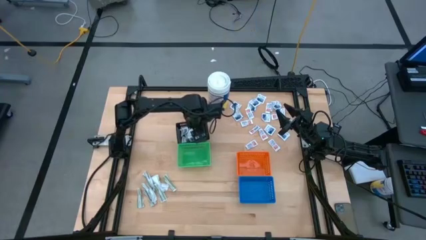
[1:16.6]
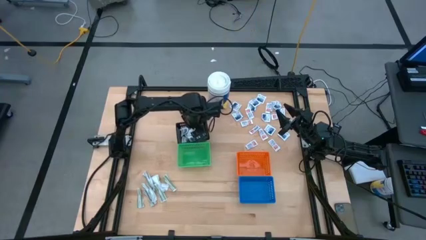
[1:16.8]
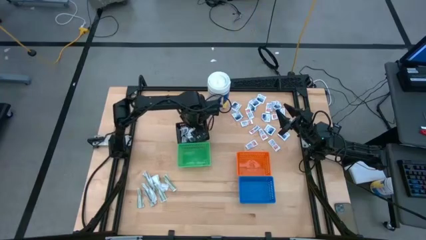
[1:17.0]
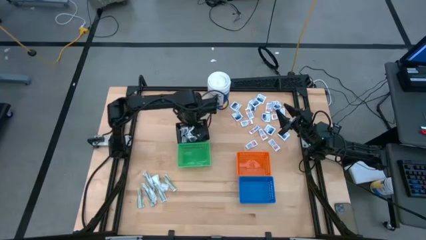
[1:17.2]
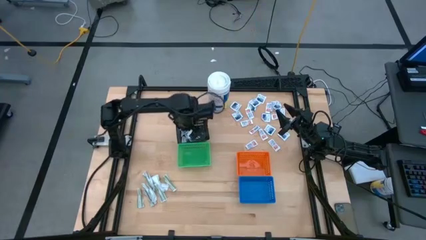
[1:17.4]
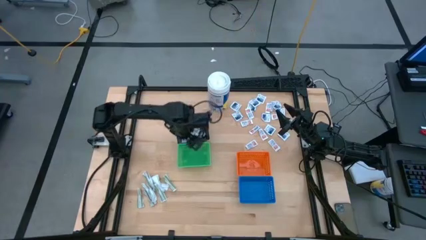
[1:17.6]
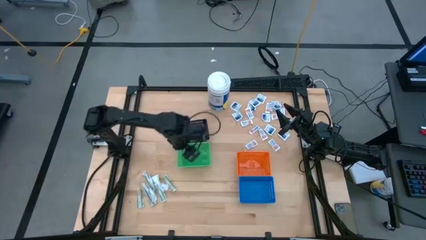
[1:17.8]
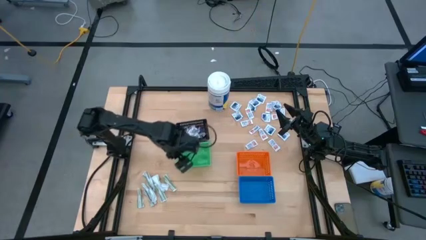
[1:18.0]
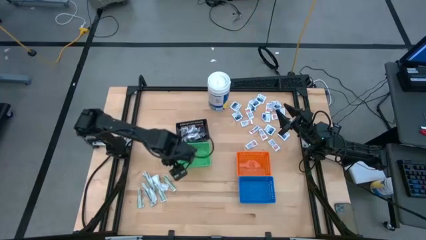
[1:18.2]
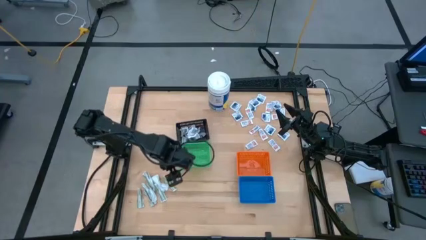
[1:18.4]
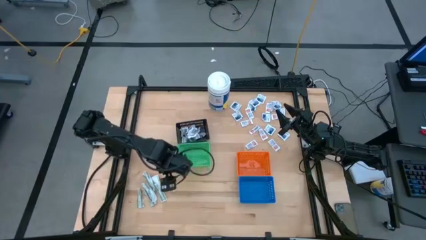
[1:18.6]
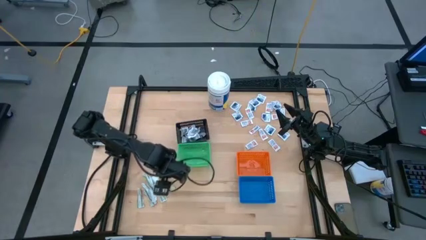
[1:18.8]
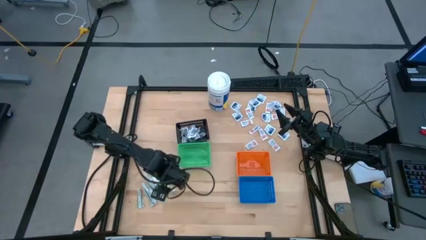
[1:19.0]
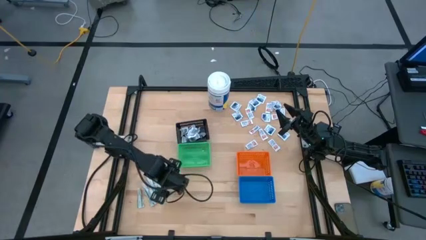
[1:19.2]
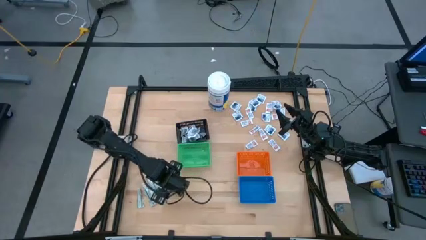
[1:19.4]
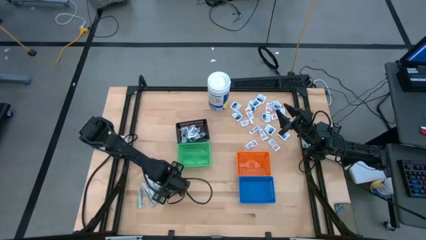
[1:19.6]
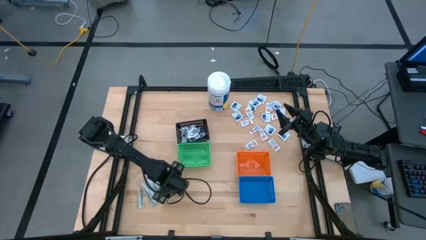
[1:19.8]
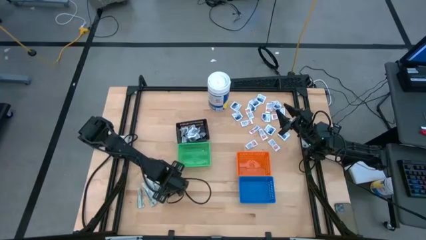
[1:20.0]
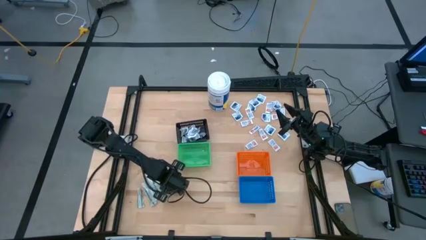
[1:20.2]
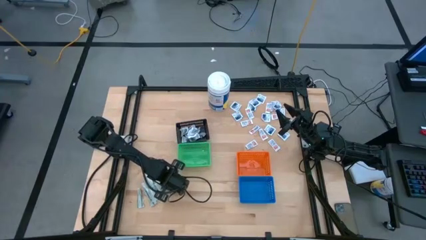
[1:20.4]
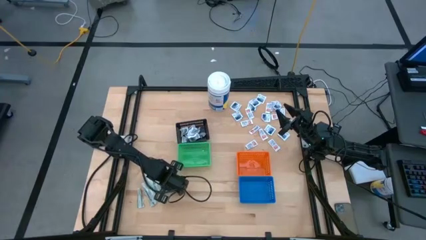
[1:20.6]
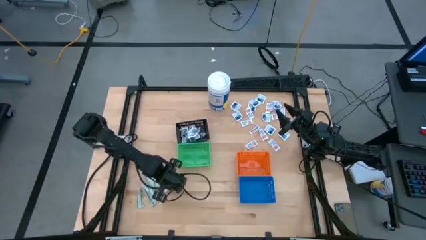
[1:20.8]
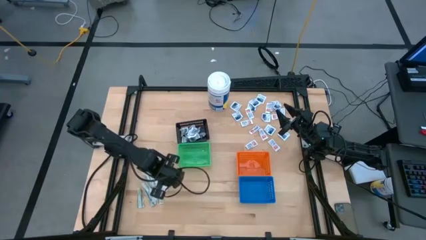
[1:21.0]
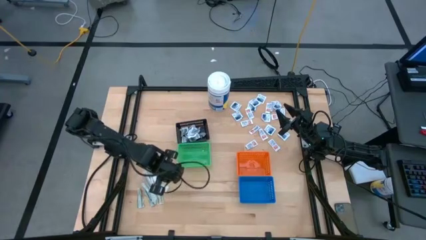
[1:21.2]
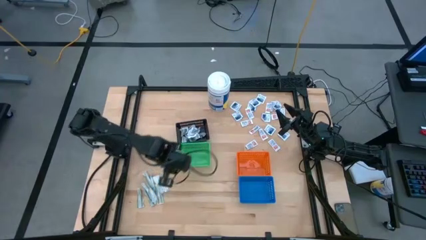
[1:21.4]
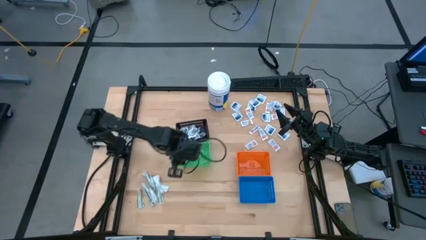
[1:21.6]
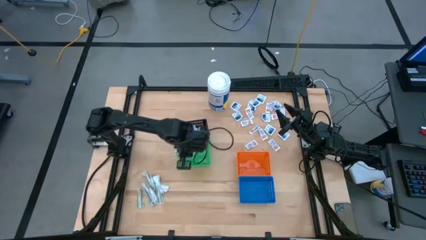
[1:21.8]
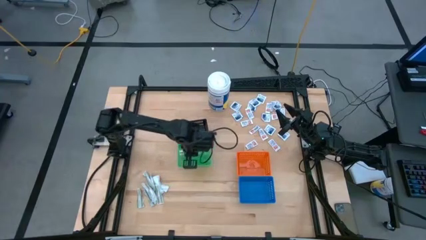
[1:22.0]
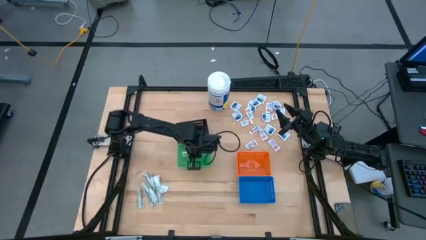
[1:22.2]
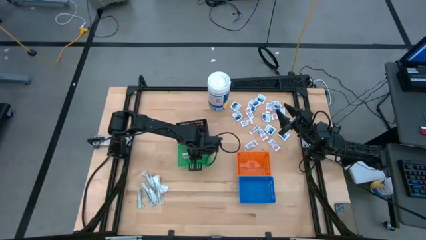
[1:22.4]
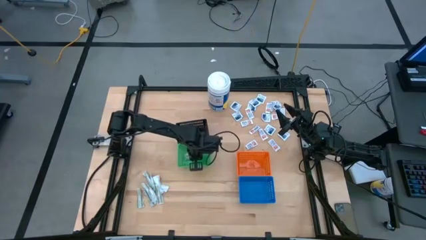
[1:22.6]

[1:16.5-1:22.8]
Task: Pick & Place First Aid Supplies
Put the green bandage into the green bin

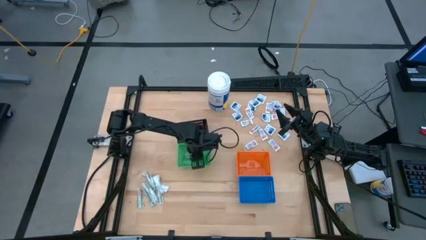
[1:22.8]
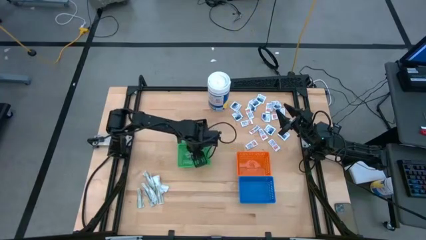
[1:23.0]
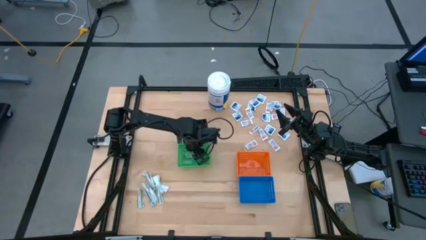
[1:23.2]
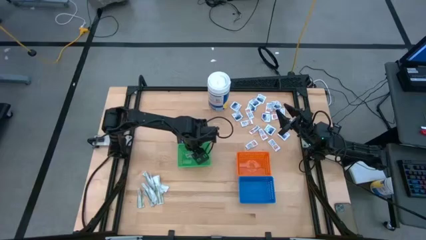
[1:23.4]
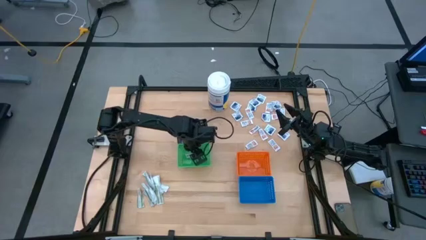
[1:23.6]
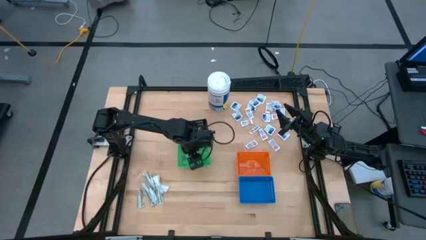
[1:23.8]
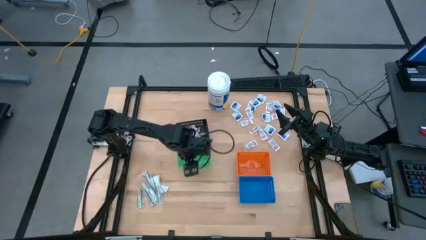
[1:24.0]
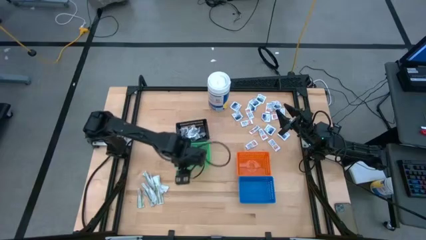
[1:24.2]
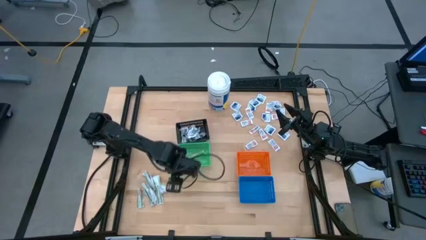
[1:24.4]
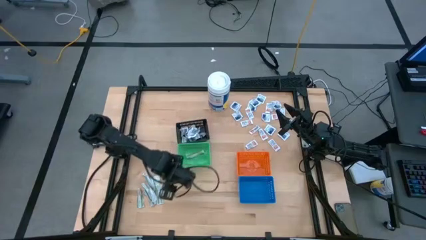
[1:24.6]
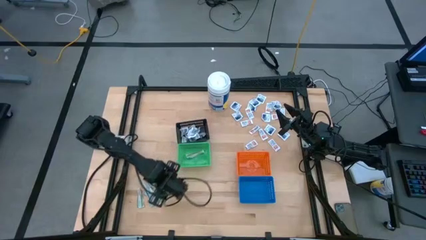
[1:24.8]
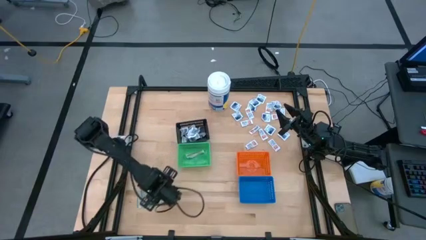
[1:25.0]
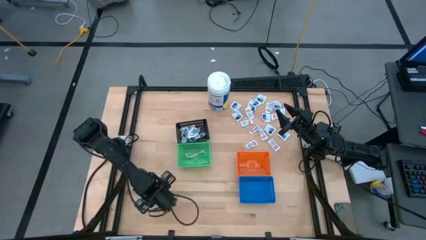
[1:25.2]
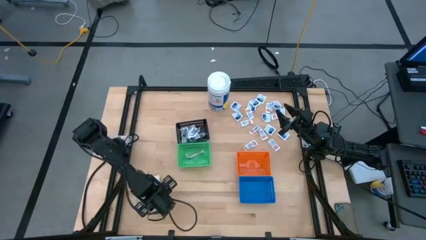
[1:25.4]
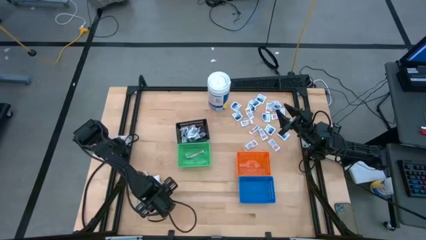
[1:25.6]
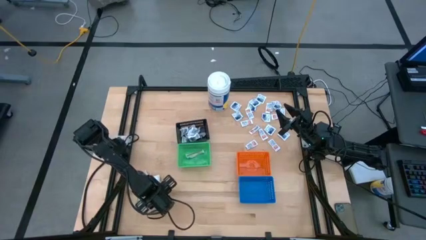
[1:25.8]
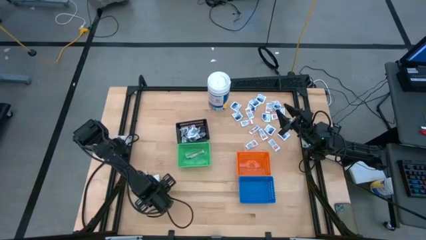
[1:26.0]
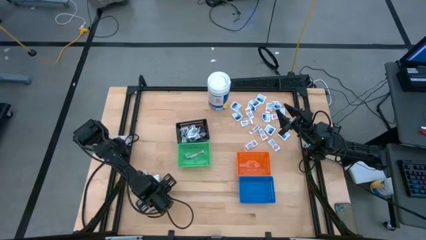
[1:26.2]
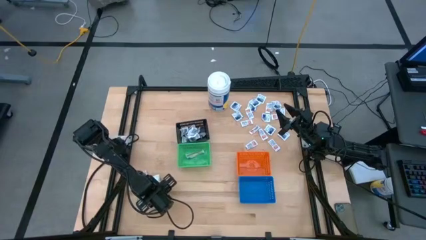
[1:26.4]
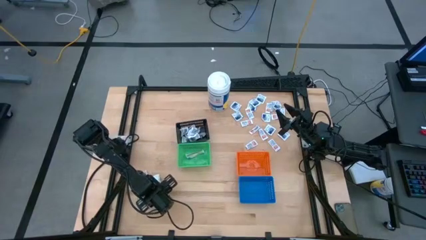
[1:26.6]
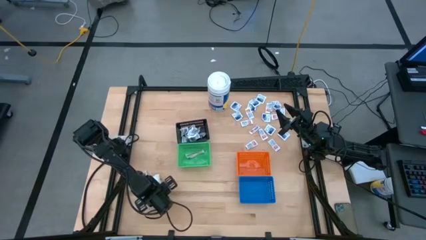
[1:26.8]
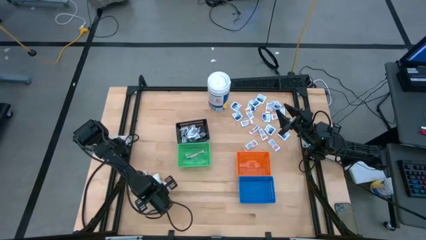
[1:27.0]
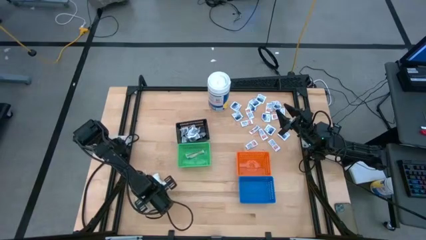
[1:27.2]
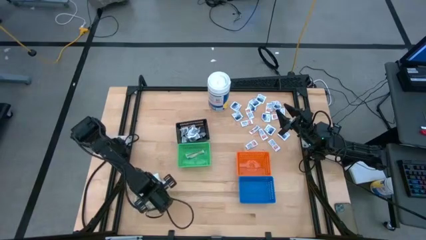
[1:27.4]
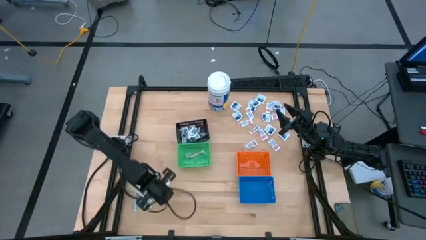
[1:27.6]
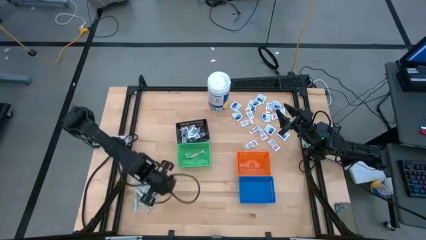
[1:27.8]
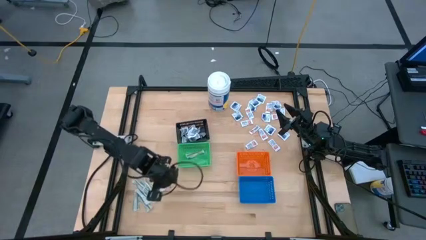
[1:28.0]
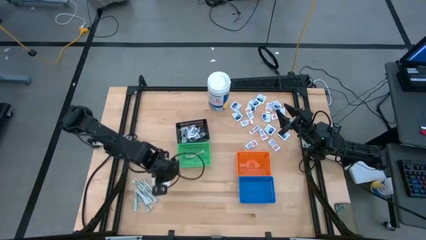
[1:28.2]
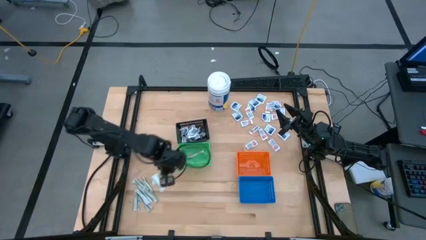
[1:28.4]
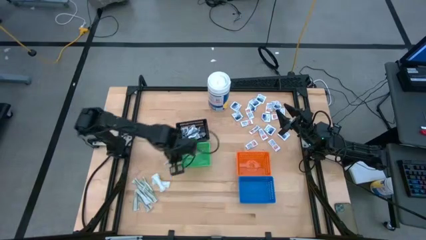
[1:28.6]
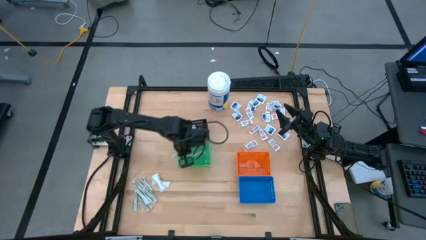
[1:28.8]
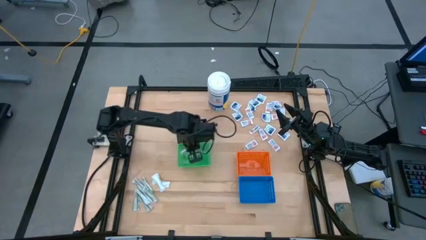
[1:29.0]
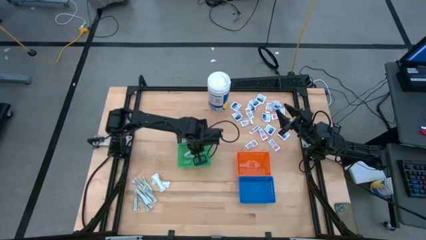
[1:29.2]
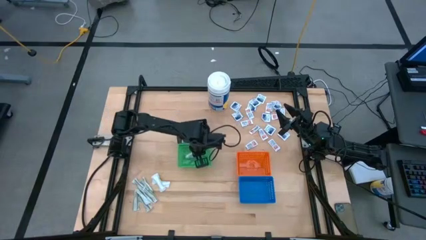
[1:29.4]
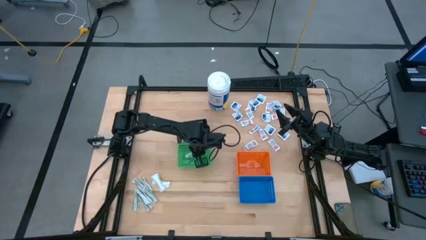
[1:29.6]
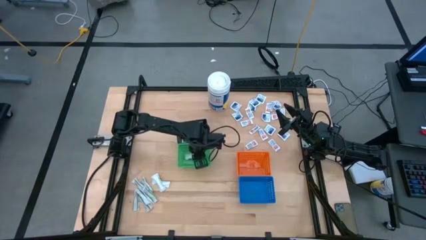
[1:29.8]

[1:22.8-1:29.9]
Put the green bandage into the green bin

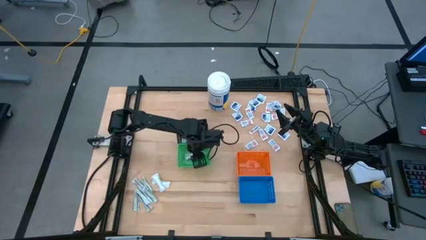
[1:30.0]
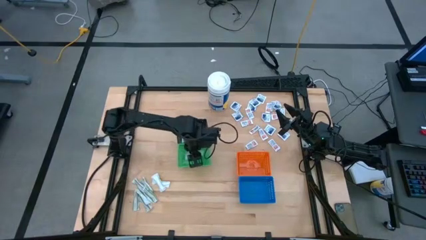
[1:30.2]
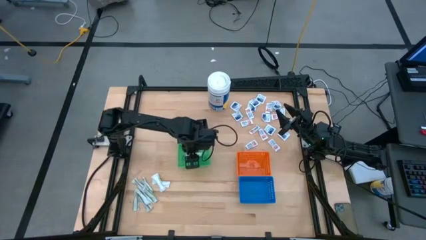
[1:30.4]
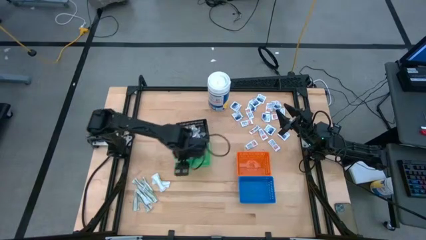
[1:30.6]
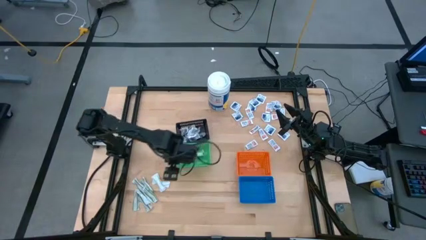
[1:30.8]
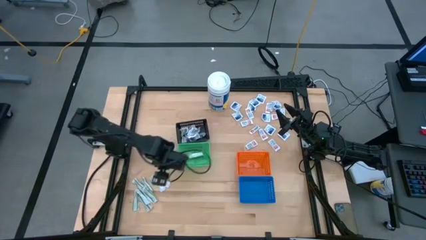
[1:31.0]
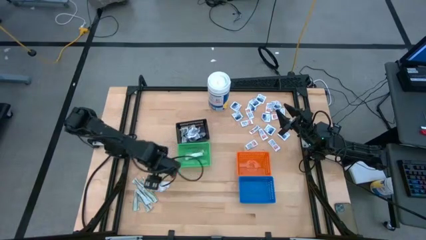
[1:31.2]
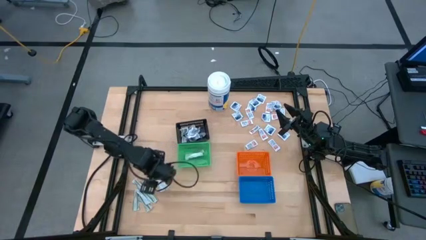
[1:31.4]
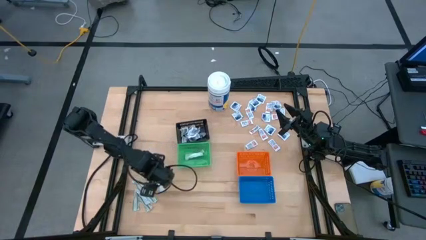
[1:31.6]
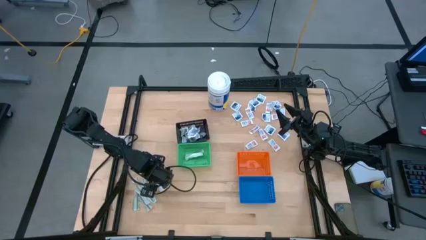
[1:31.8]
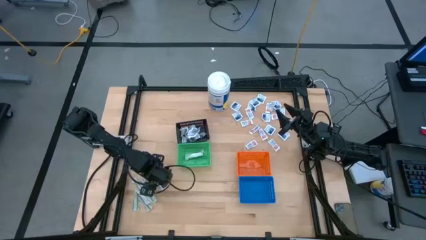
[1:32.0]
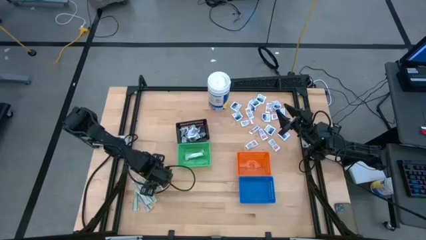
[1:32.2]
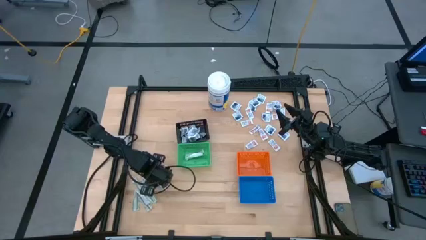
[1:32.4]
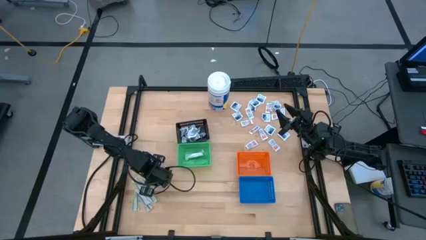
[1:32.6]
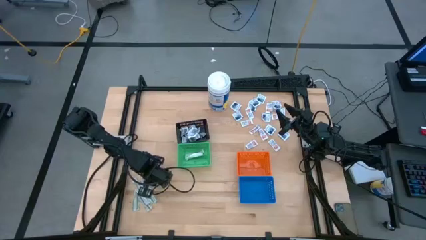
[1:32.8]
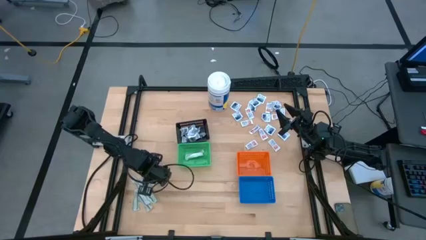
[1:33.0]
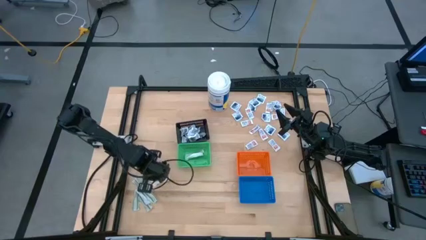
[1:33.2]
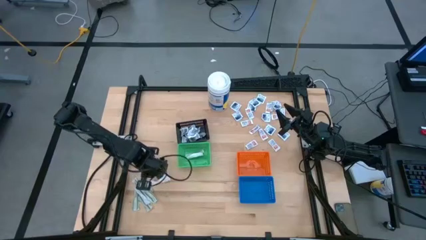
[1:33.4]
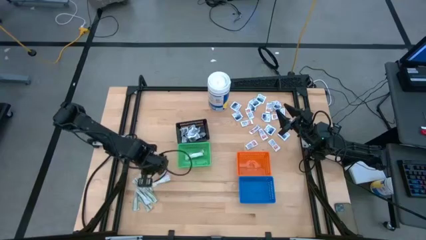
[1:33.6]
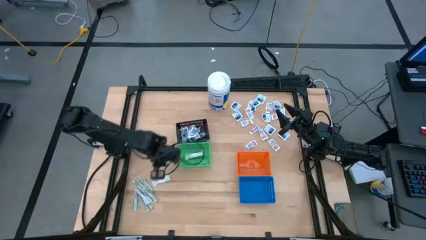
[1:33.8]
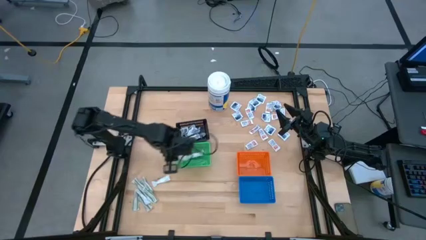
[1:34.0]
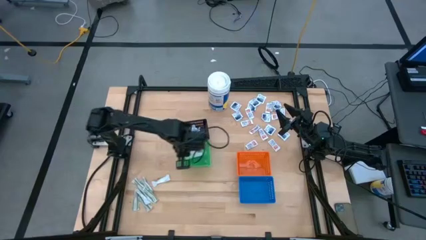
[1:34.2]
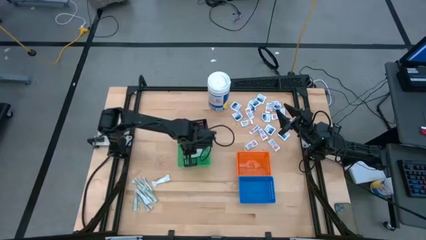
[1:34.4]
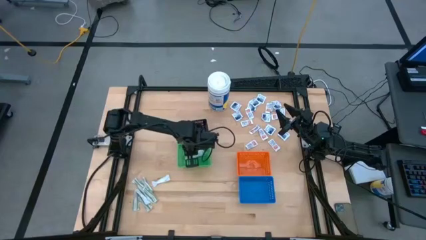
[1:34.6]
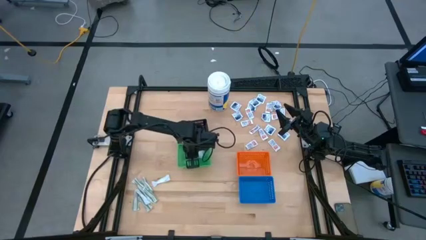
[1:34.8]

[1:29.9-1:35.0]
Put the green bandage into the green bin
